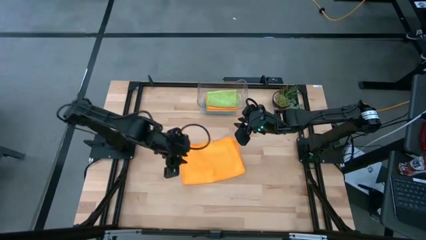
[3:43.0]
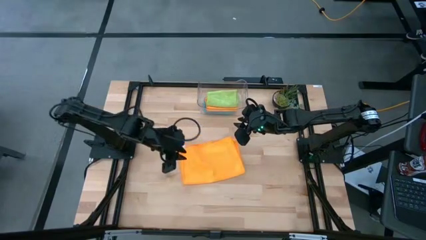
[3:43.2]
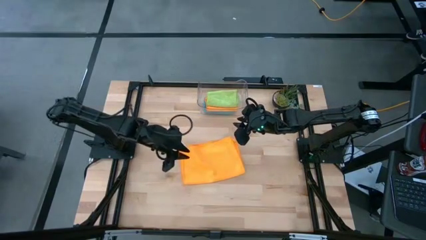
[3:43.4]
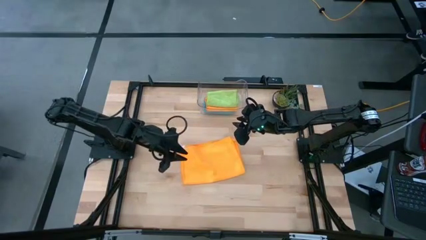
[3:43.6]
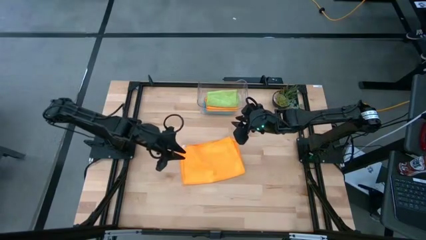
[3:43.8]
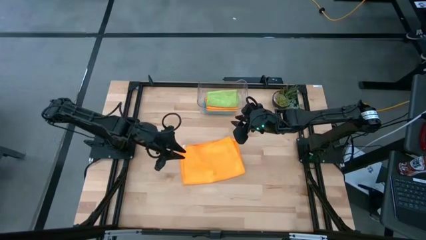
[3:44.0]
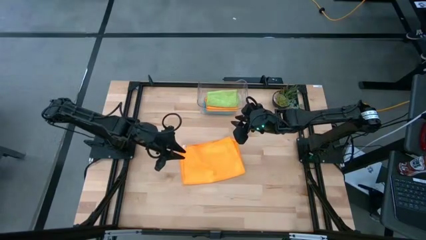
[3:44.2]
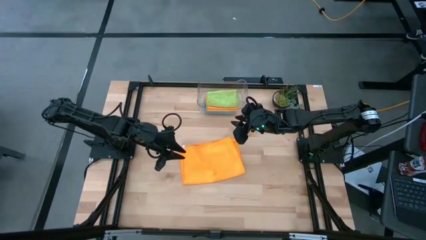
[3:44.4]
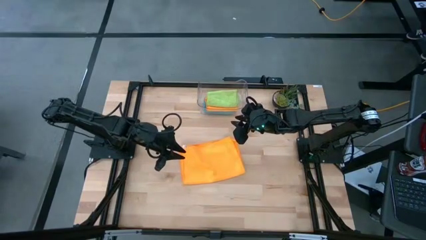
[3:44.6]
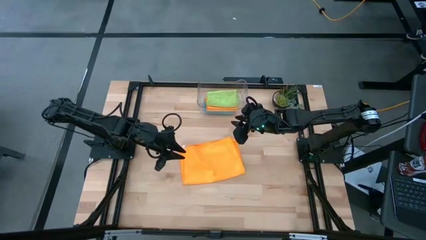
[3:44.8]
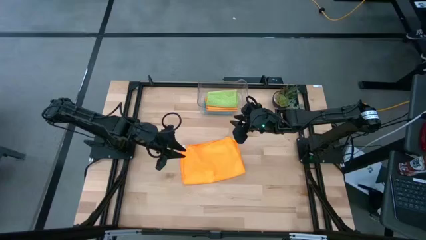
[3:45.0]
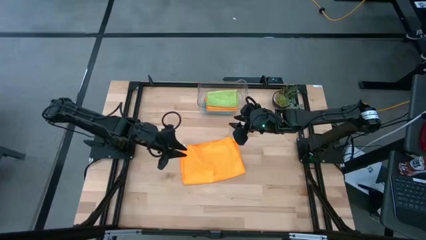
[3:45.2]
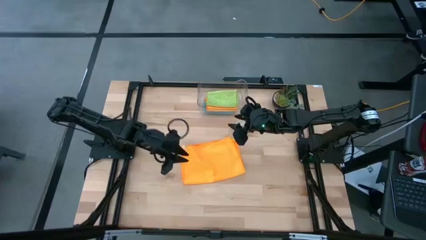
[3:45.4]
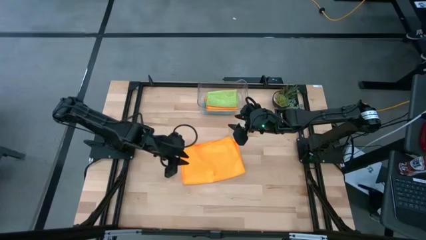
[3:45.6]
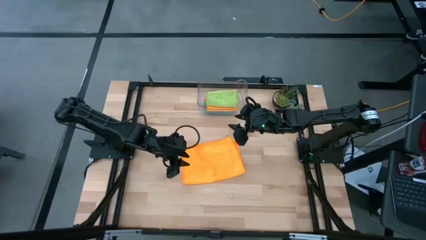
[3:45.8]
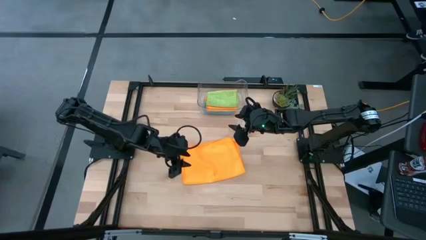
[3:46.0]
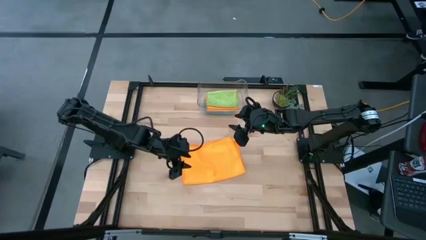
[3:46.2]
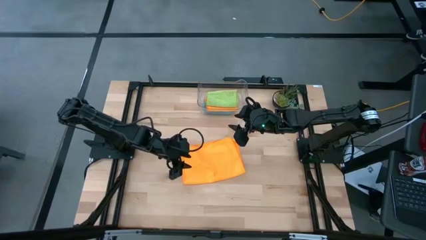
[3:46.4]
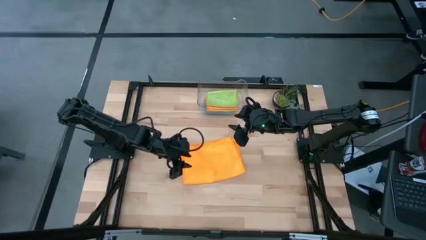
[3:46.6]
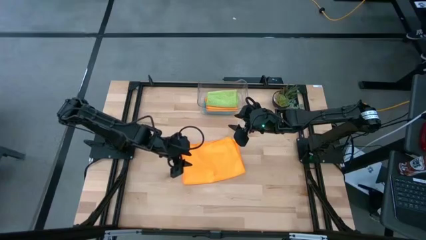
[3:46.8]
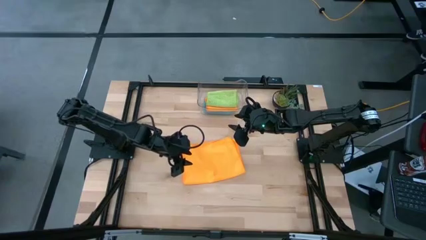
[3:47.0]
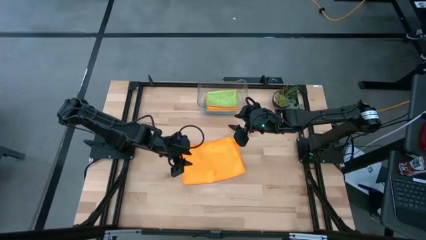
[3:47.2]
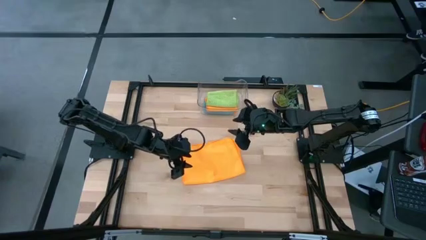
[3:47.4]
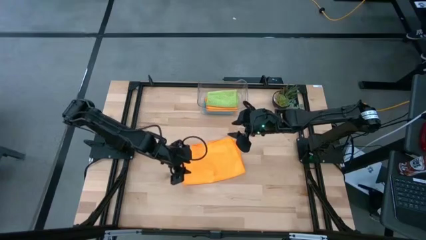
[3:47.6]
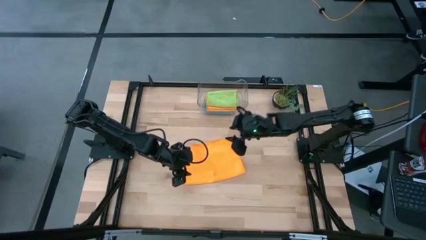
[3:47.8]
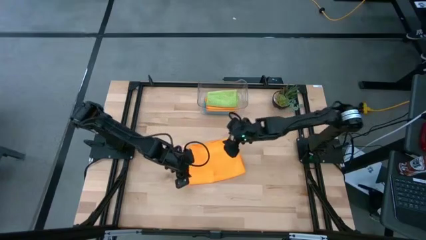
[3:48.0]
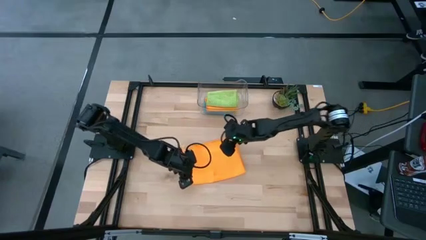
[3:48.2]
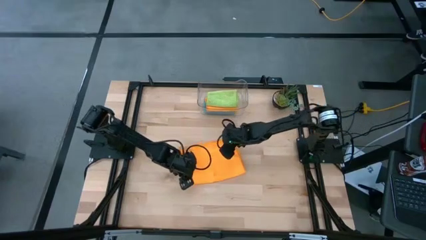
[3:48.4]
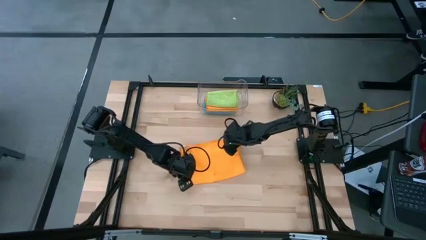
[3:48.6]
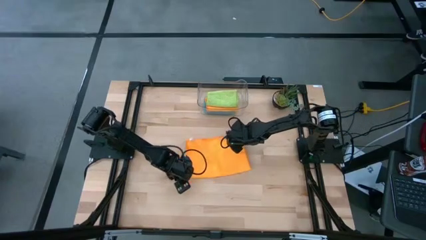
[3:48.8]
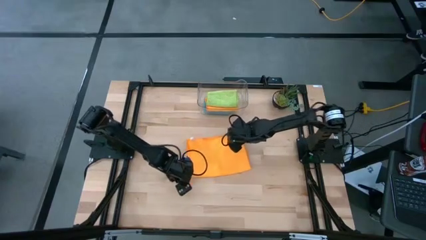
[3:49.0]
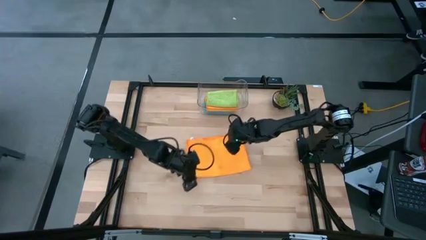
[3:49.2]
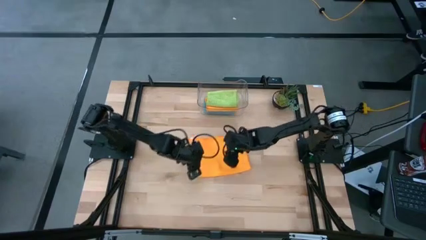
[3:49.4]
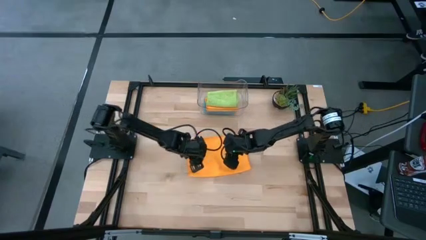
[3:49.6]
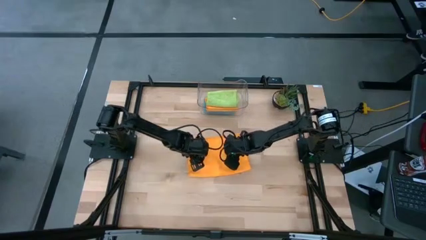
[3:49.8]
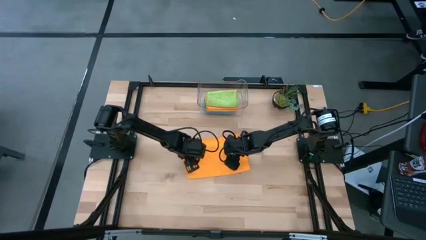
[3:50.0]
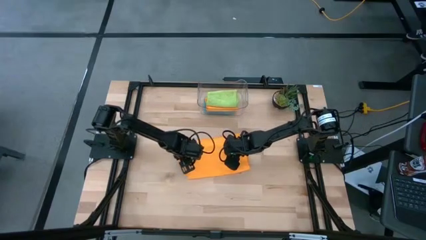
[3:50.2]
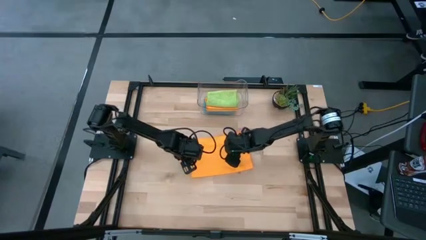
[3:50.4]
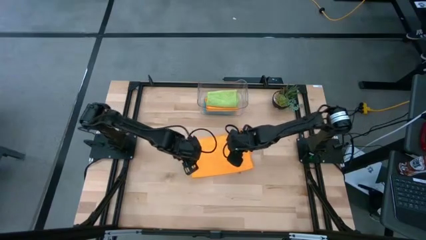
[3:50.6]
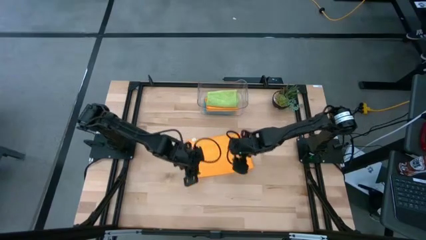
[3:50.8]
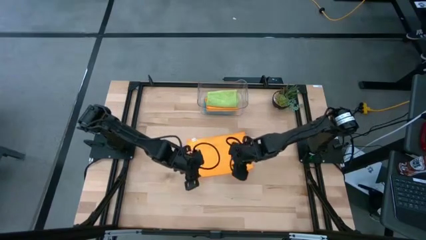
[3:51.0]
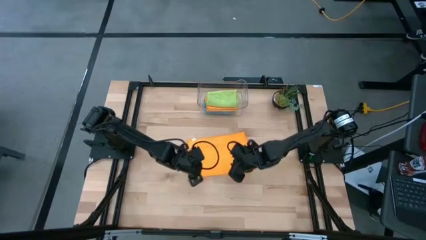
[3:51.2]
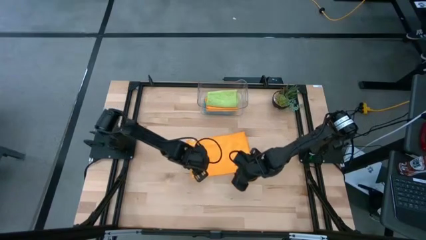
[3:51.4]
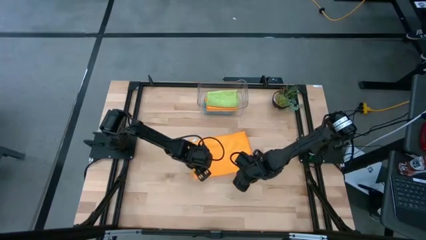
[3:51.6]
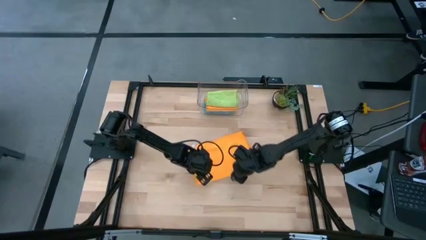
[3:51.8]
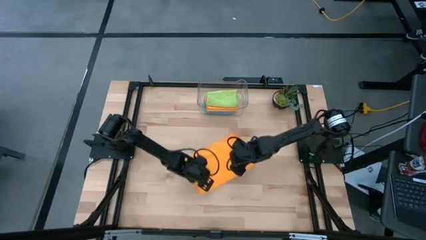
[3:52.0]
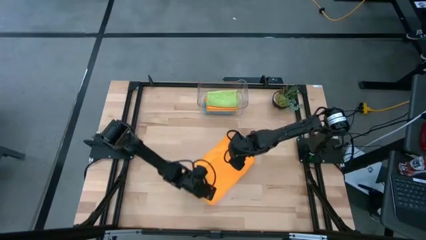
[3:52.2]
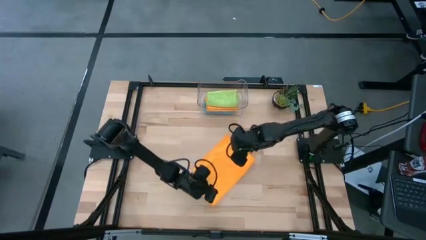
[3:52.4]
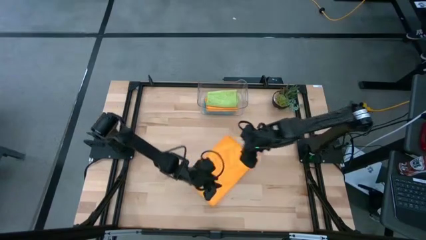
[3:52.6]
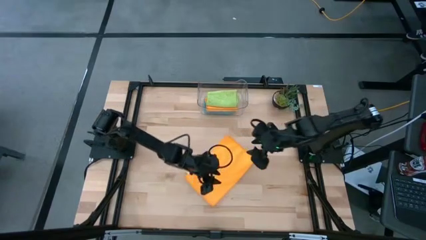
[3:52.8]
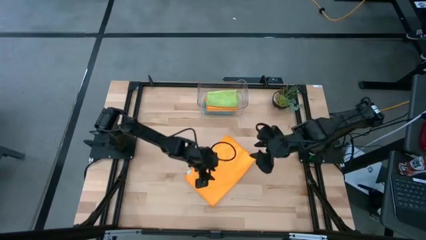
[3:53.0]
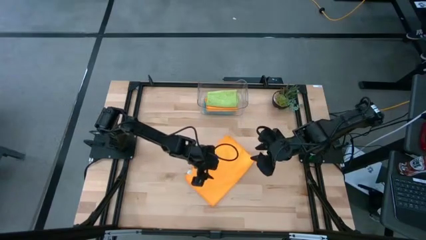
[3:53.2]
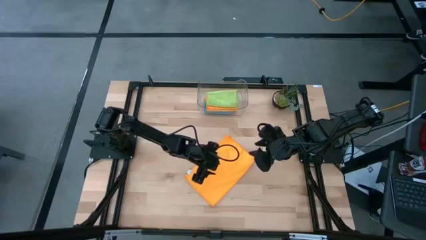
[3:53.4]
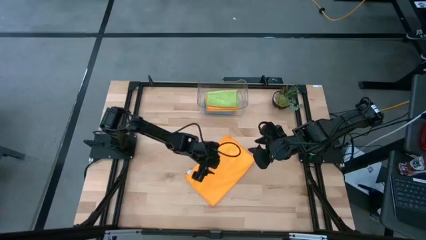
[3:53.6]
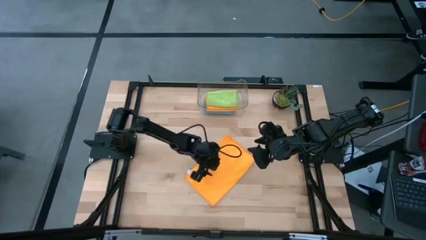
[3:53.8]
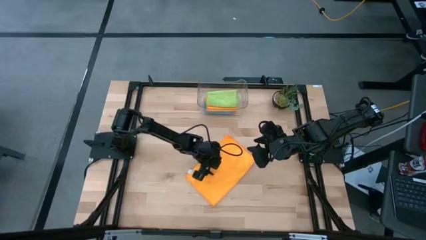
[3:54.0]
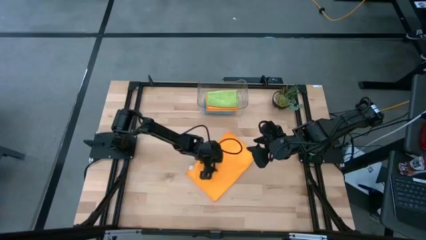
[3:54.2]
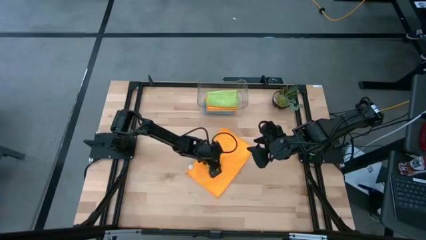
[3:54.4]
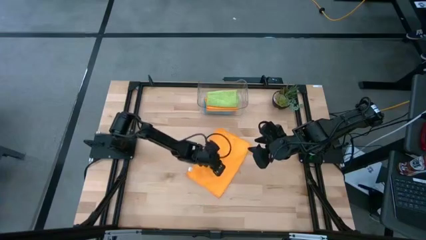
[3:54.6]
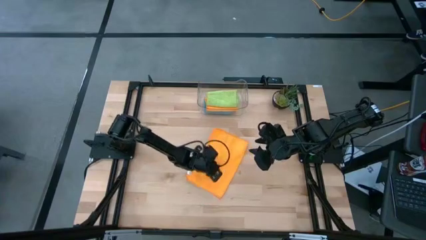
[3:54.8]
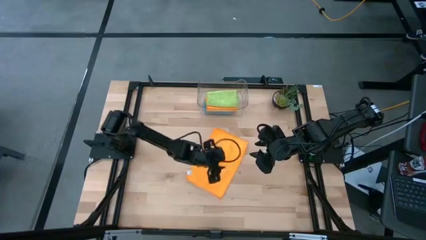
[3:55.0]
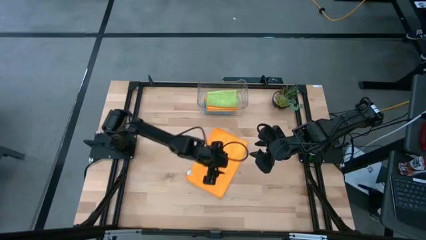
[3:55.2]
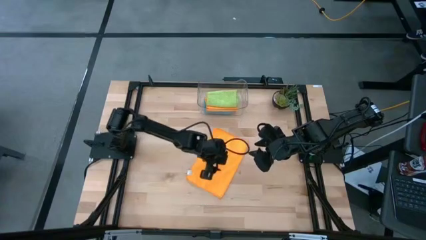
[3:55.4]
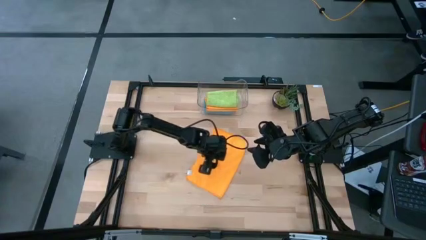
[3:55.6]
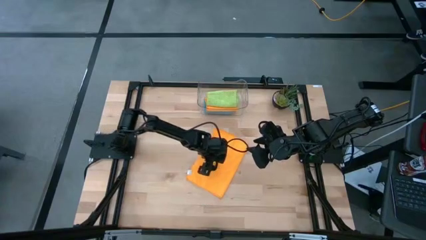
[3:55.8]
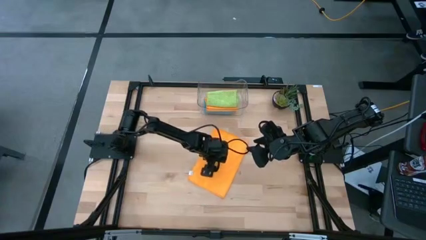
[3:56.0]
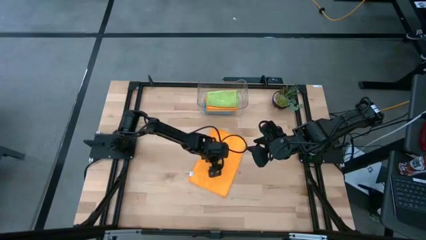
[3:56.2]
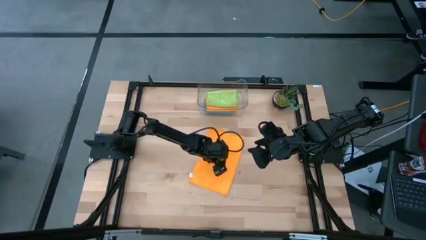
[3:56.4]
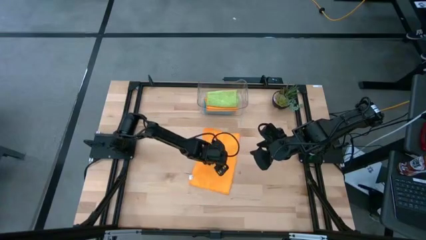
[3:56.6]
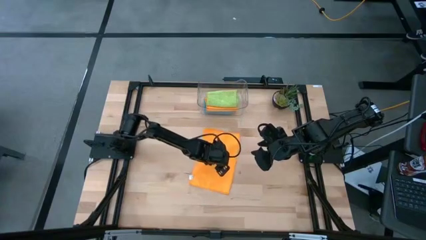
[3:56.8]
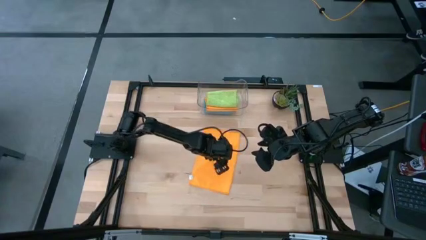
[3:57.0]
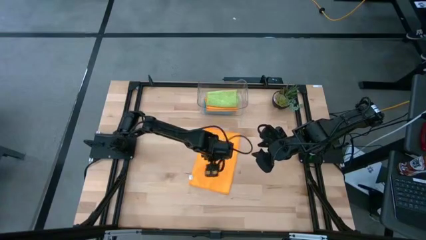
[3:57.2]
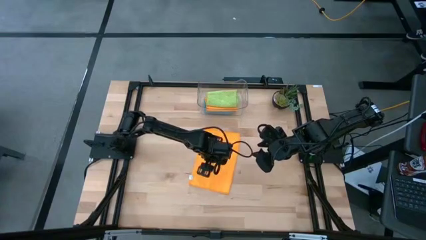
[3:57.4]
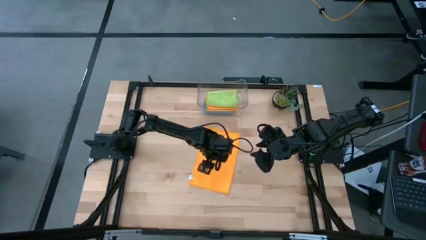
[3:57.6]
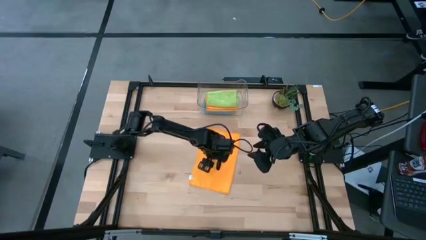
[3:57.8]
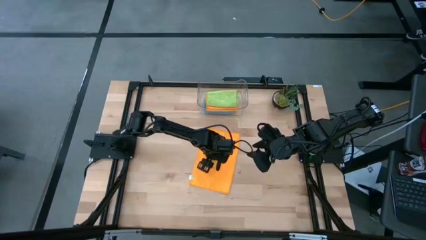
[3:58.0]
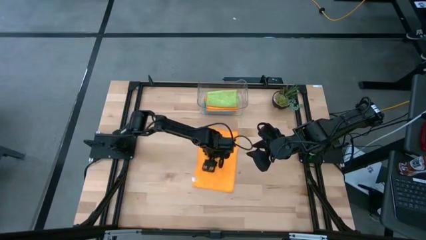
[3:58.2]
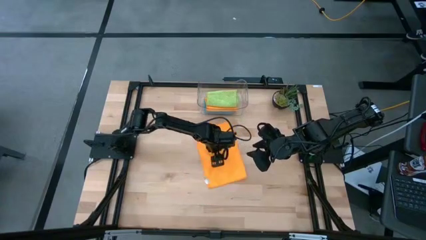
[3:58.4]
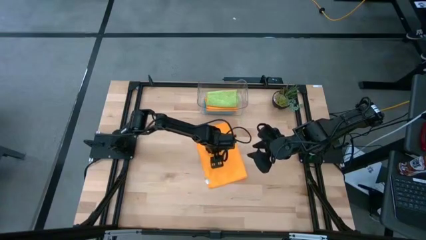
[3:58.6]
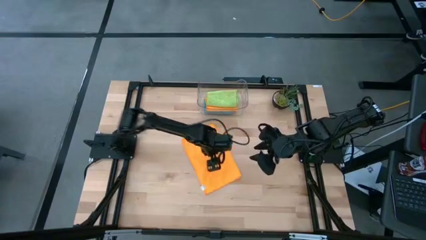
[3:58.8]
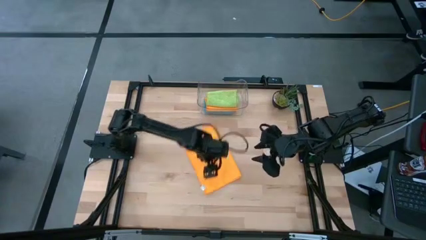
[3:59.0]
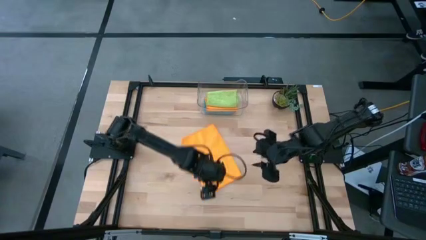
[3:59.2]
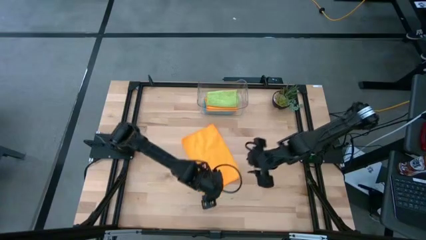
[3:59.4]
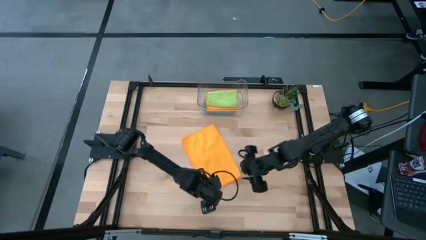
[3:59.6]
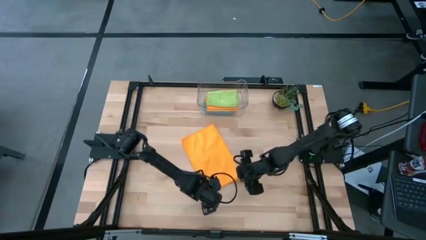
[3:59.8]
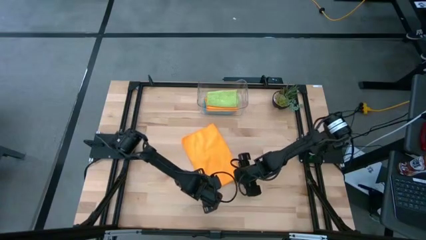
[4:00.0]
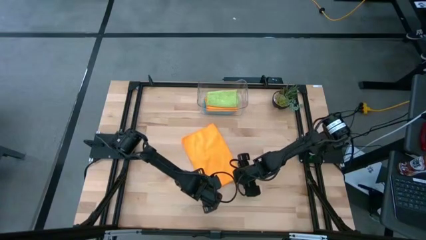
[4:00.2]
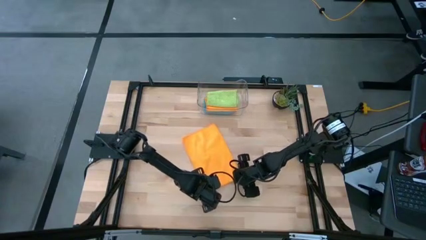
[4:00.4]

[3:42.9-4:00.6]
Task: Fold microfiber towels
Fold the orange microfiber cloth
